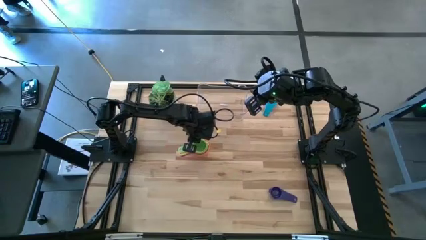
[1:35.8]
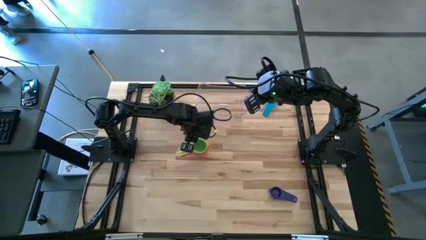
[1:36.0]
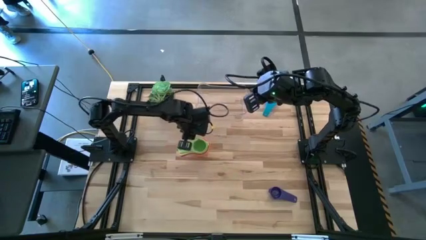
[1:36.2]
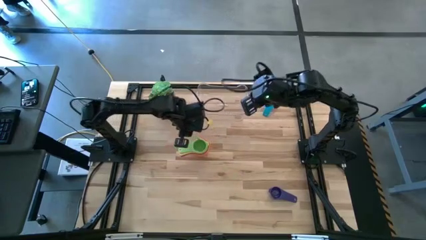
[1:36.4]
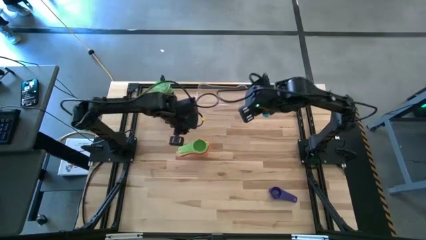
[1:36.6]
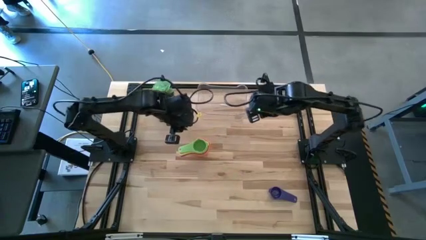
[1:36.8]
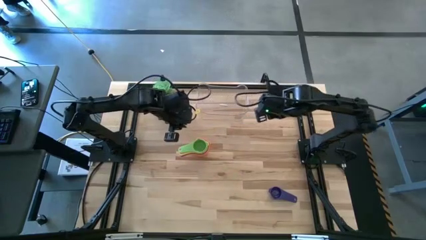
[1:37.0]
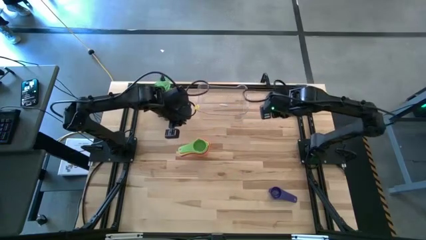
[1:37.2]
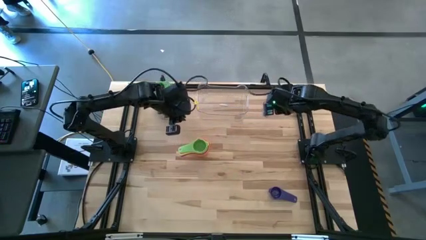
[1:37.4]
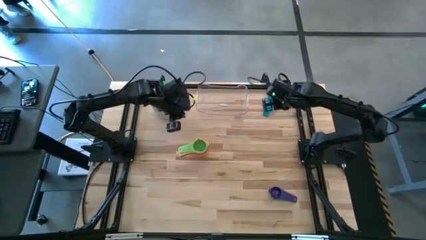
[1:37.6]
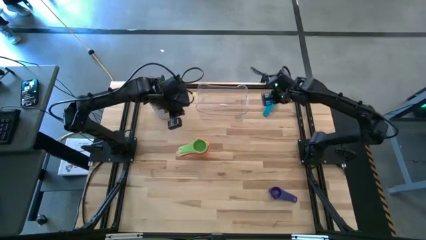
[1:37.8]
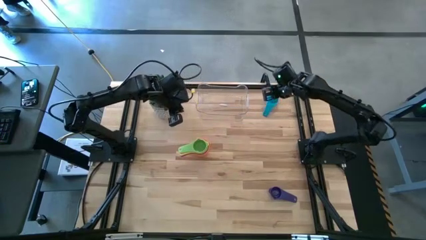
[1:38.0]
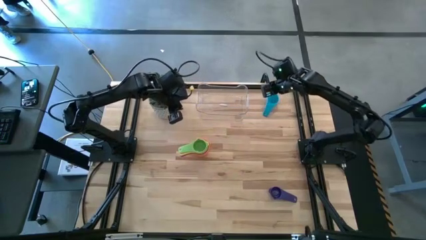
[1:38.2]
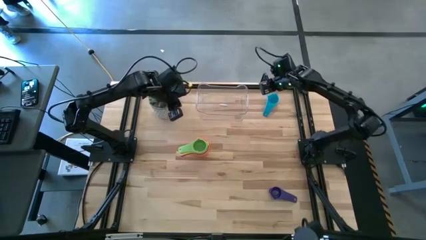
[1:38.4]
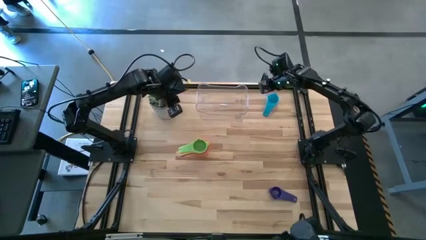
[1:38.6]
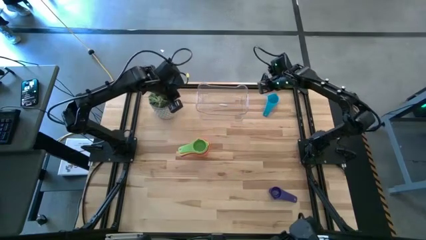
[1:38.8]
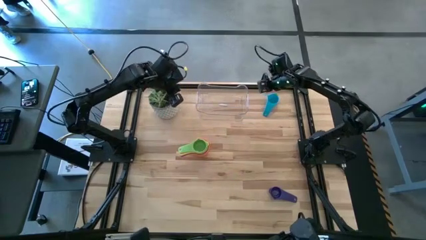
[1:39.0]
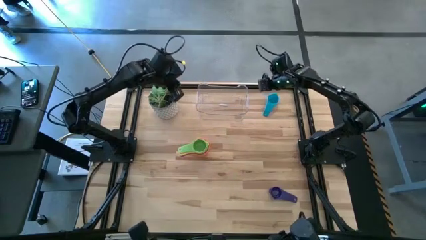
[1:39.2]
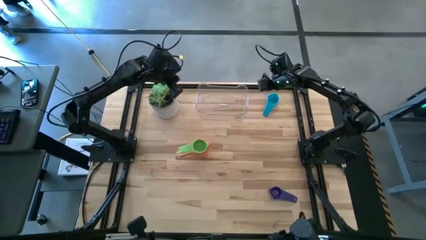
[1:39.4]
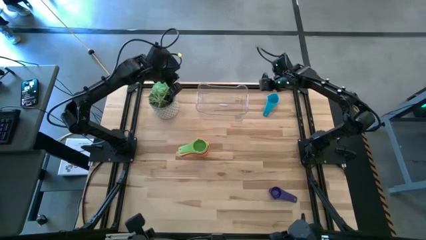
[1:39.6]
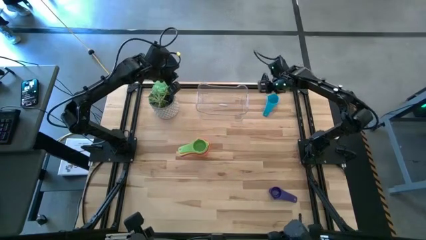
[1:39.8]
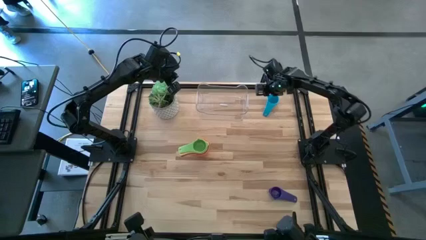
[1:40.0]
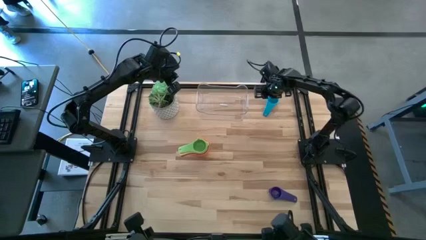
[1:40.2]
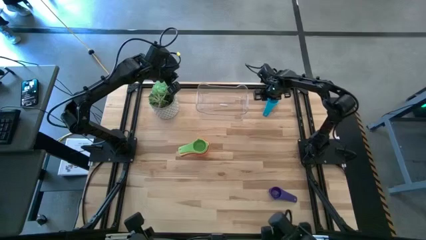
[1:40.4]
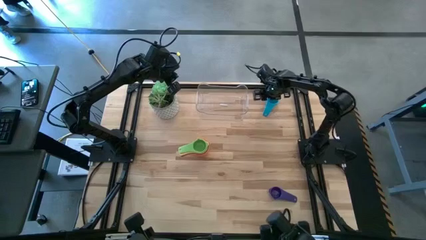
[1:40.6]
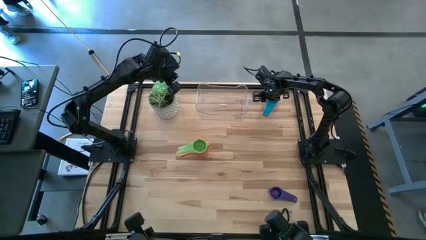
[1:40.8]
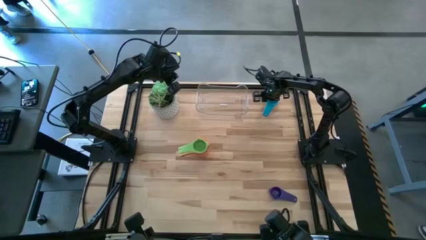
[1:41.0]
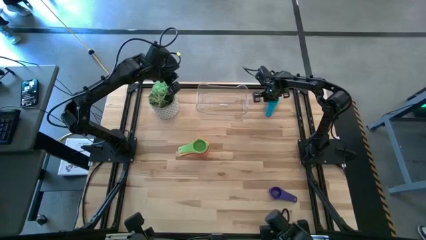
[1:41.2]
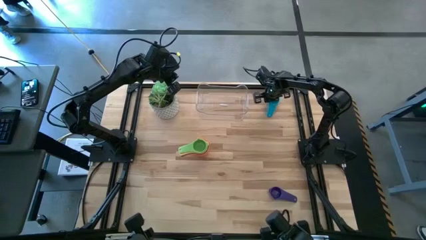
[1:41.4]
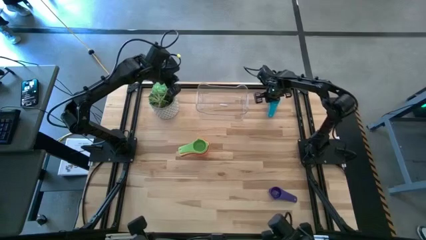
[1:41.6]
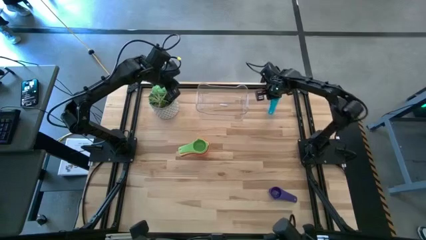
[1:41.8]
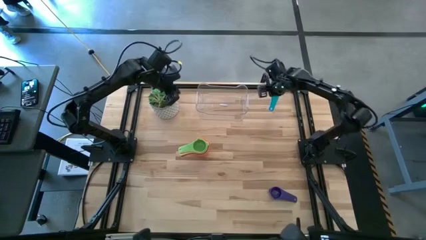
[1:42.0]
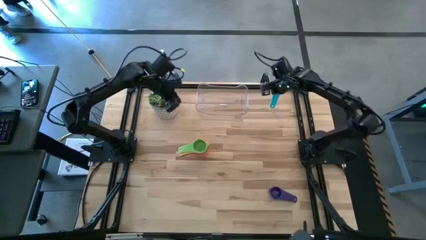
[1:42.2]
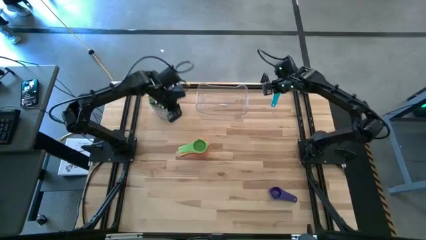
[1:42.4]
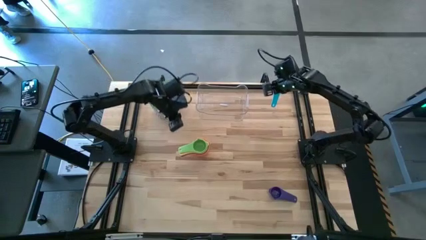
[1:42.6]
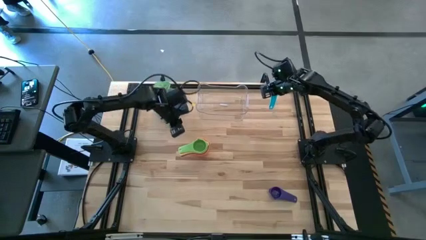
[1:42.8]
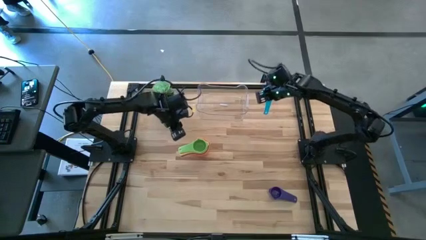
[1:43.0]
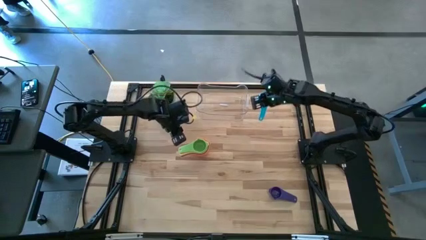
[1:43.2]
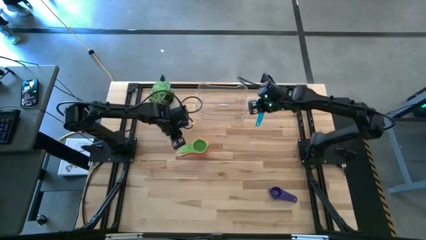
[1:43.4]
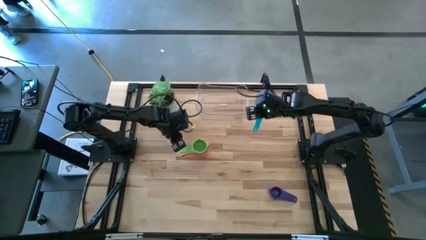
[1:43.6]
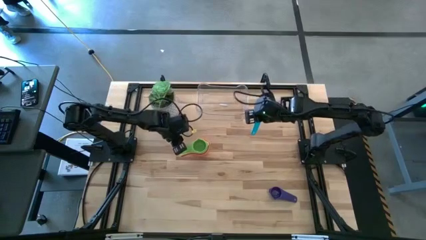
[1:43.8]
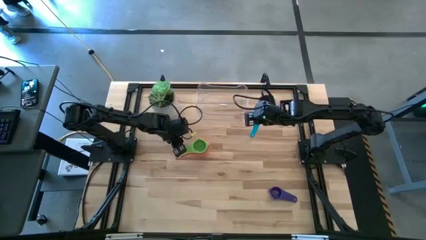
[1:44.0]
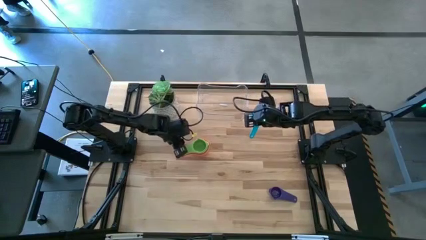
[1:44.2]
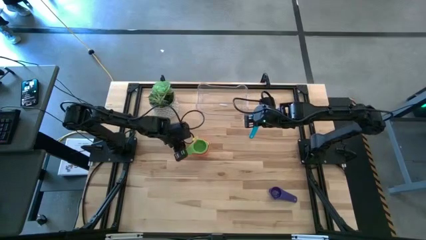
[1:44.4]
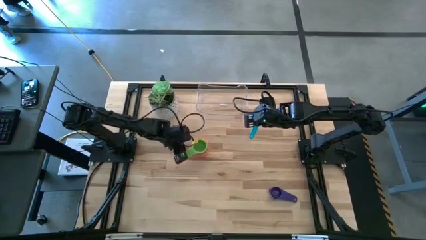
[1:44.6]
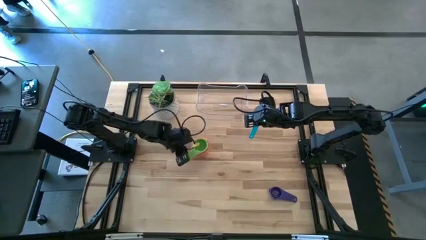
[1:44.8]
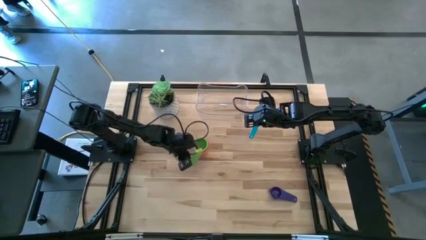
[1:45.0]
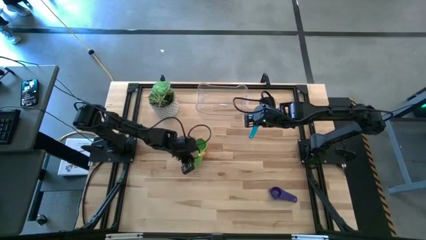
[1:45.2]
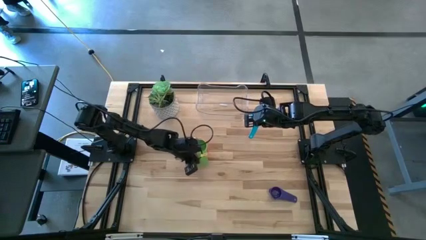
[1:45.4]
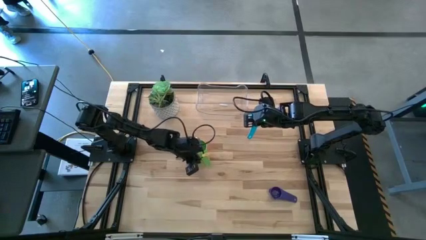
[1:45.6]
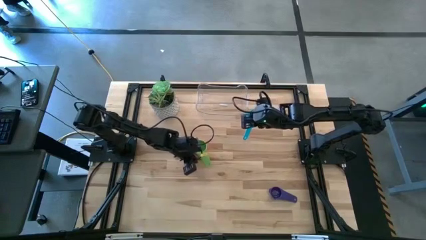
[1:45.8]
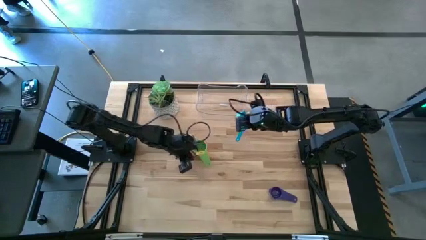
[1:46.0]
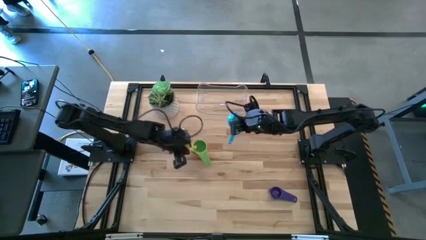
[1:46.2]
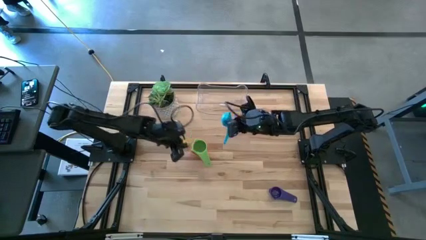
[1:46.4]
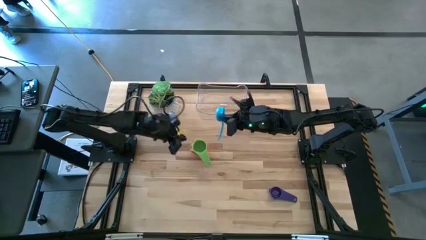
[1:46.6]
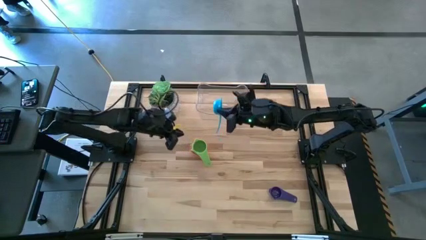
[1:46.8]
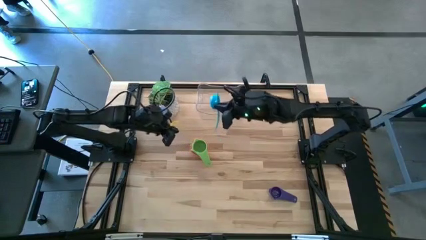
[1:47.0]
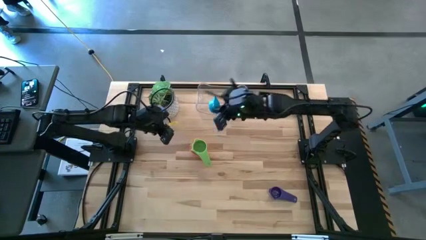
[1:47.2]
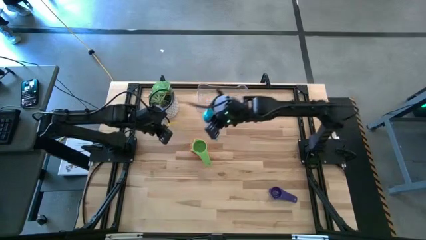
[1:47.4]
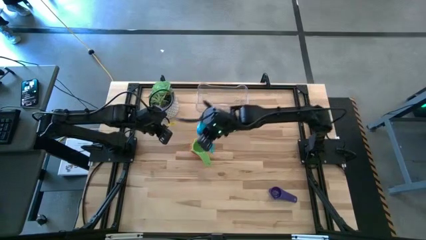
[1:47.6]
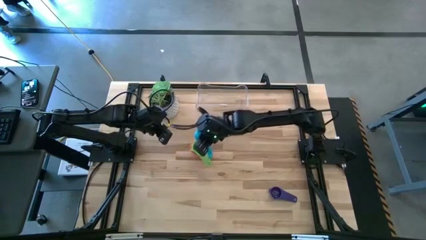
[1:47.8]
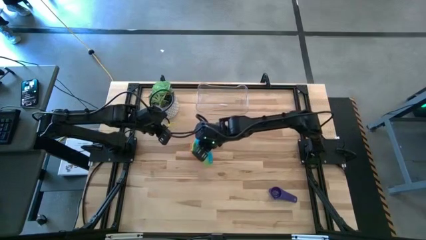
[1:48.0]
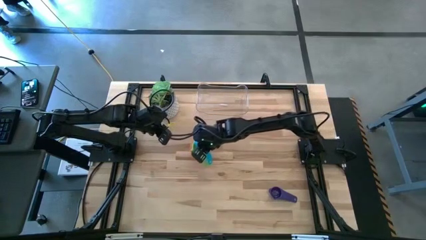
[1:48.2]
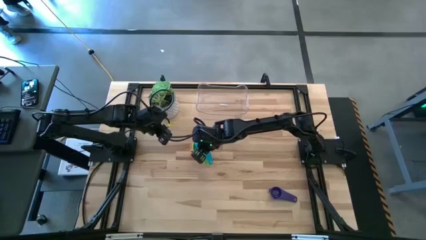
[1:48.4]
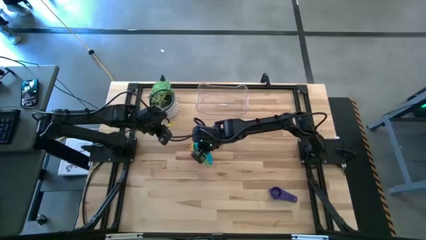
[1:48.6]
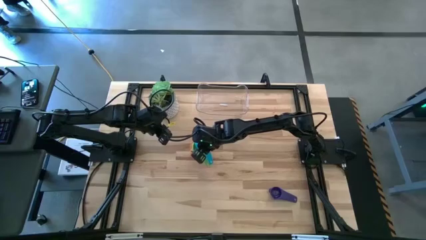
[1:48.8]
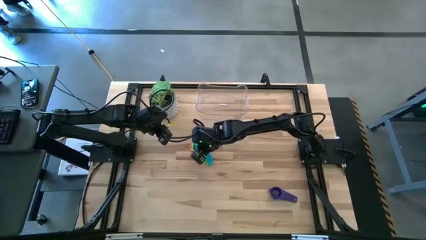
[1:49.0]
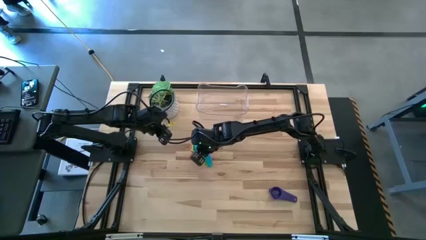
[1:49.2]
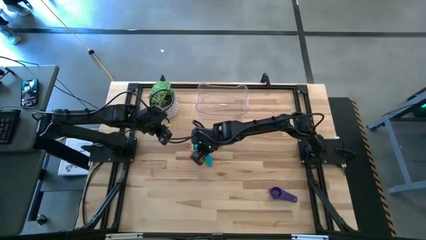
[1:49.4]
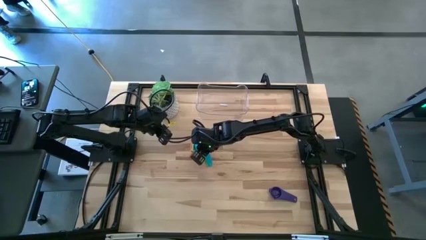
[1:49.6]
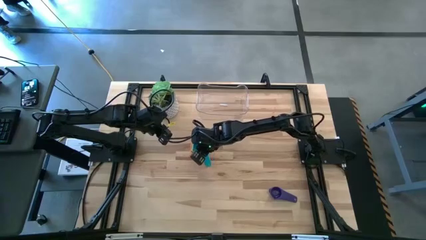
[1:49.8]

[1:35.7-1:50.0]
Task: Nest measuring cups in basket
Stack the light blue measuring cup on top of the green measuring cup

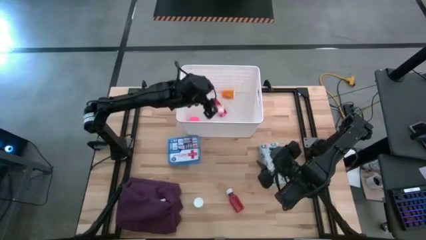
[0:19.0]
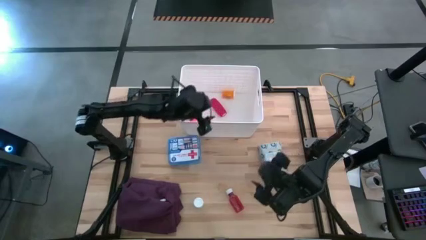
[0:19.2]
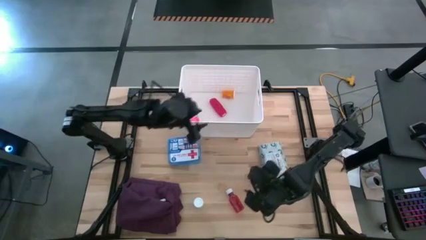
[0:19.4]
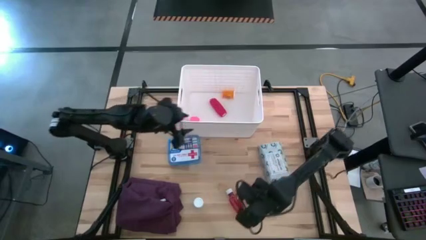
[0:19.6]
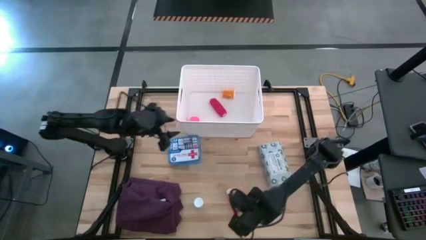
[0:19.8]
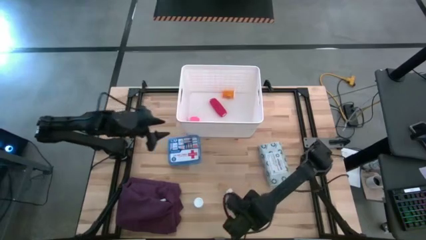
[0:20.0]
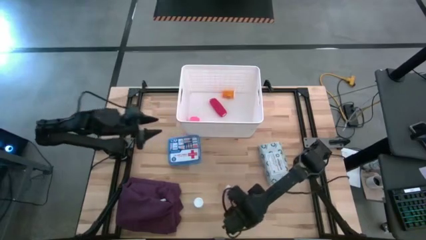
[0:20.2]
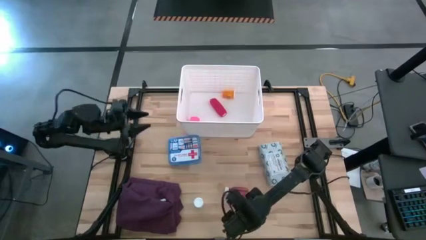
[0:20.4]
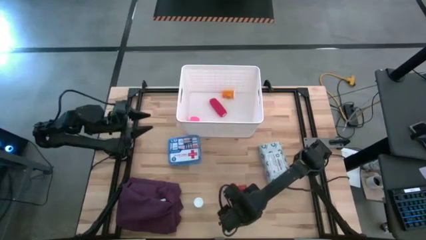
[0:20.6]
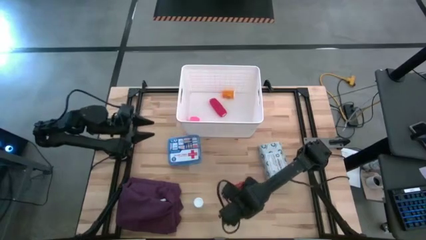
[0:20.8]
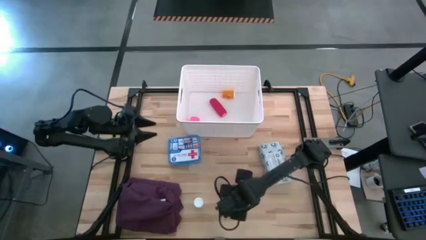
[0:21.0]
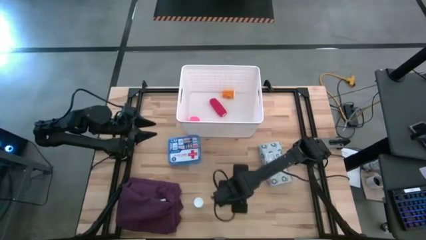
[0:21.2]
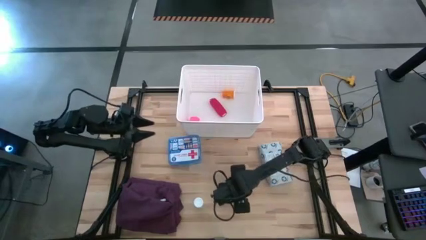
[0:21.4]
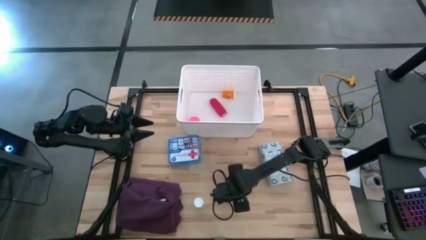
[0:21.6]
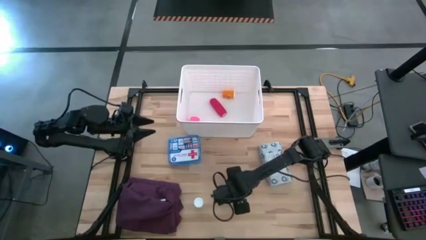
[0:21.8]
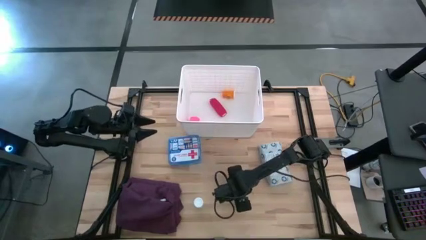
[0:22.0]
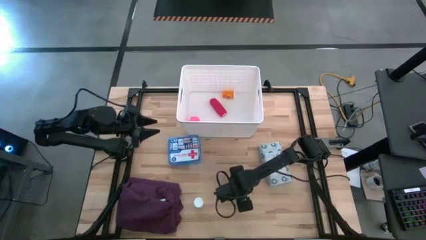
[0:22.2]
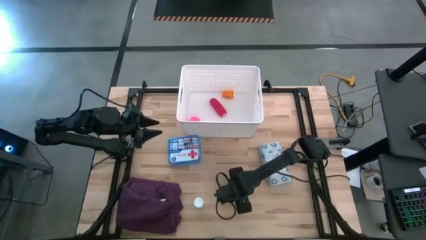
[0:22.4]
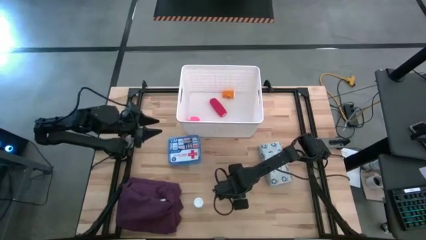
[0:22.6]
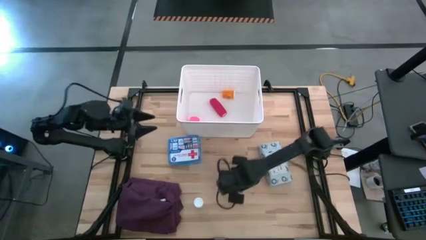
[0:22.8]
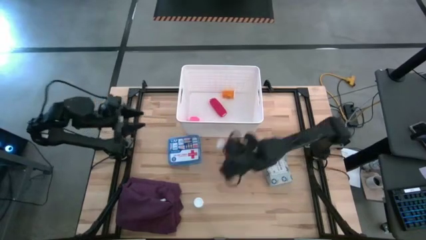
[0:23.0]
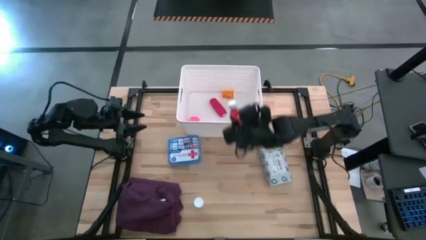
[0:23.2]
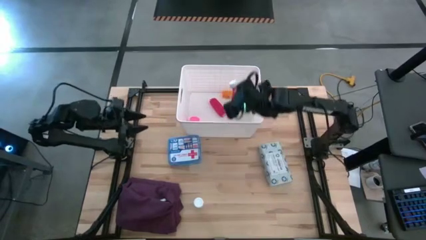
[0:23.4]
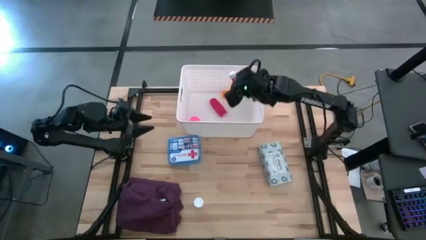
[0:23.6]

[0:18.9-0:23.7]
Task: Pick & place medical supplies in basket/bin
Put the red pill bottle into the white bin
